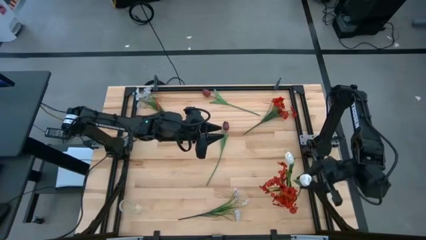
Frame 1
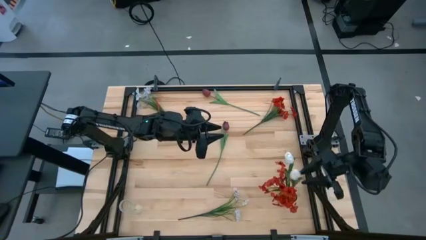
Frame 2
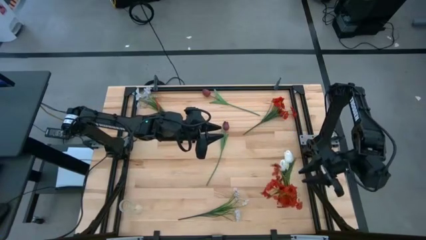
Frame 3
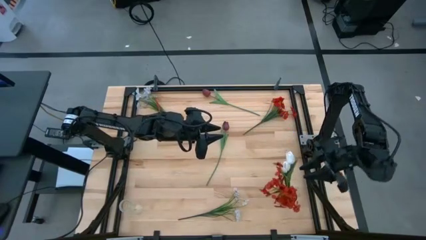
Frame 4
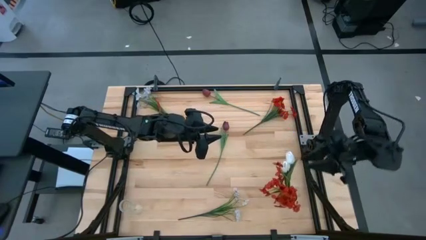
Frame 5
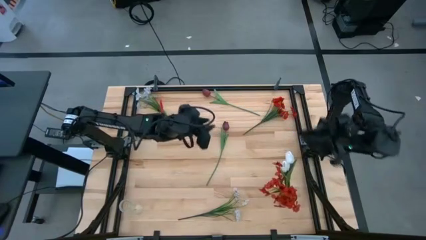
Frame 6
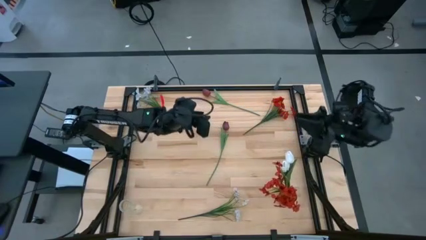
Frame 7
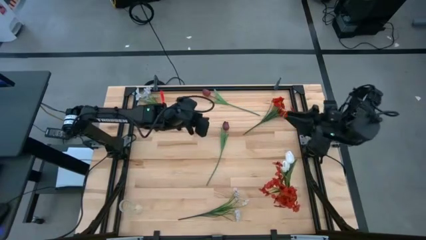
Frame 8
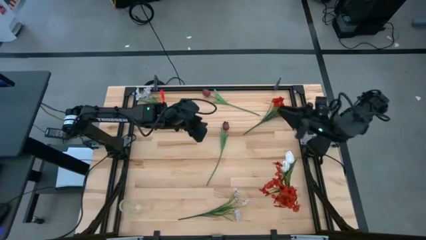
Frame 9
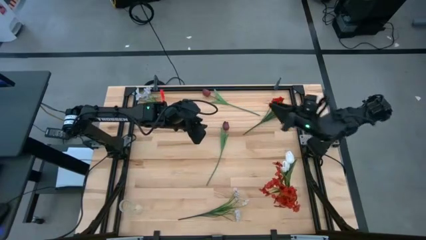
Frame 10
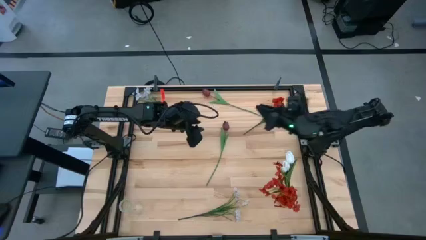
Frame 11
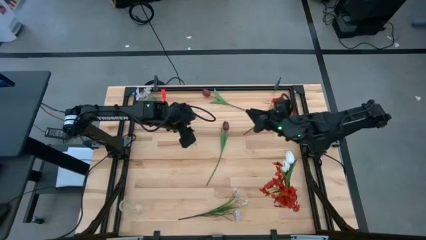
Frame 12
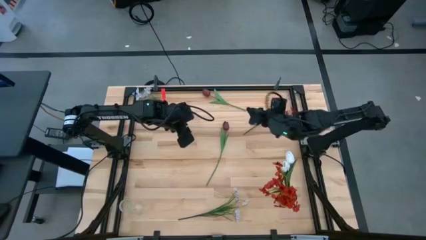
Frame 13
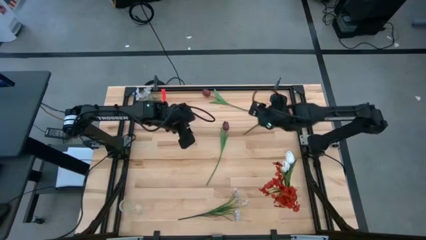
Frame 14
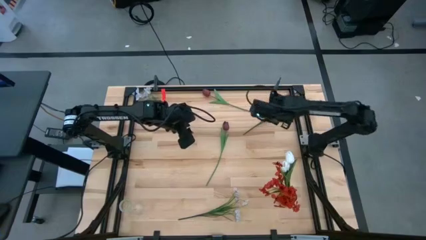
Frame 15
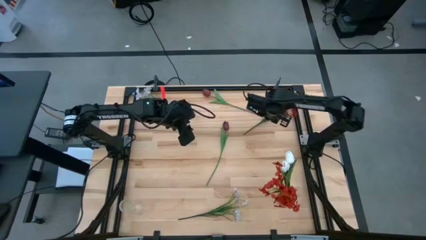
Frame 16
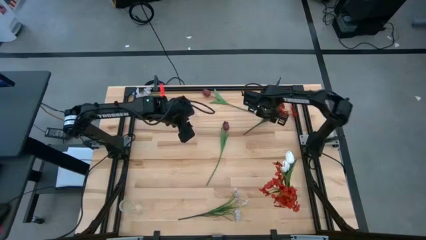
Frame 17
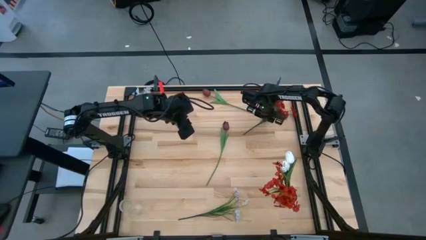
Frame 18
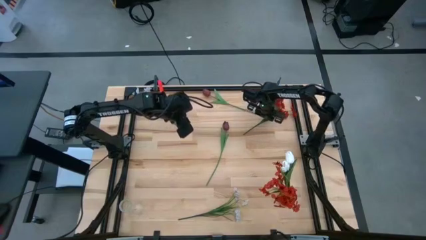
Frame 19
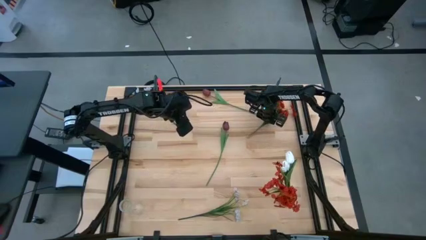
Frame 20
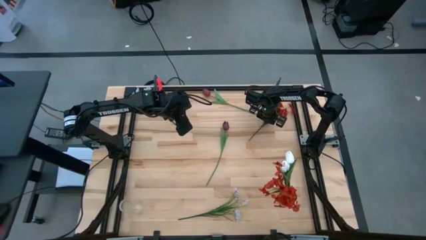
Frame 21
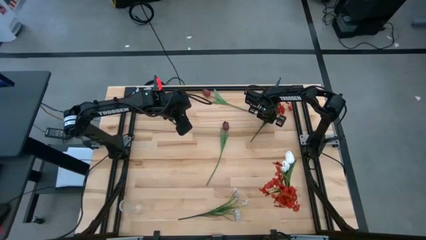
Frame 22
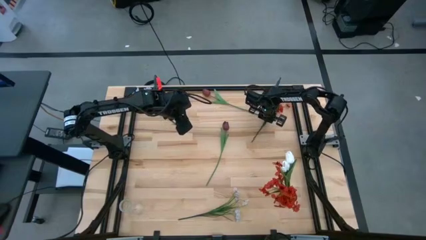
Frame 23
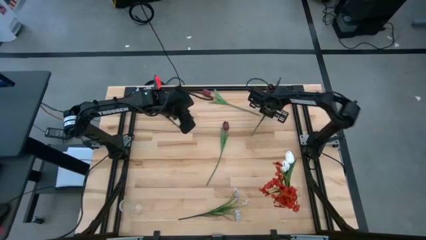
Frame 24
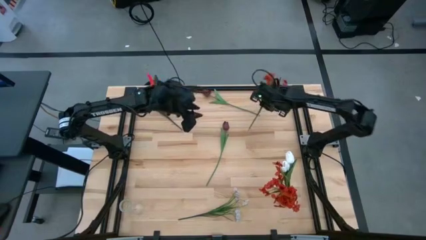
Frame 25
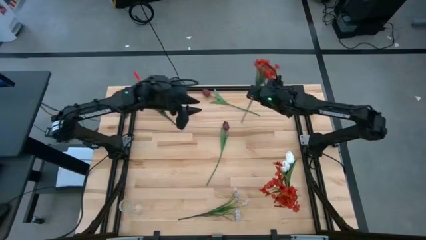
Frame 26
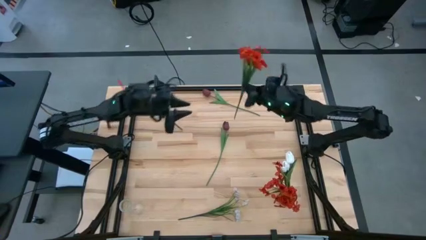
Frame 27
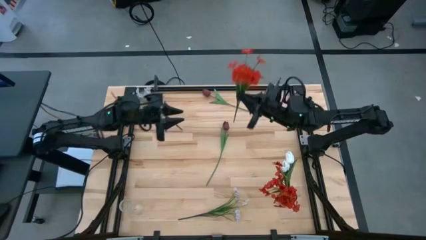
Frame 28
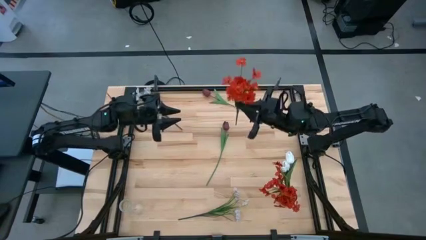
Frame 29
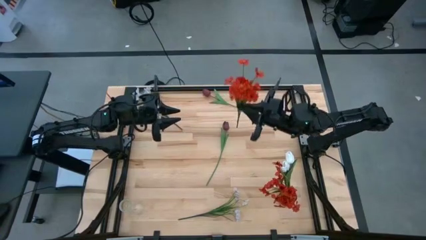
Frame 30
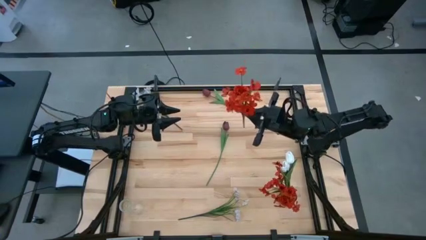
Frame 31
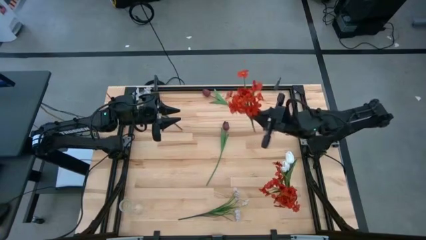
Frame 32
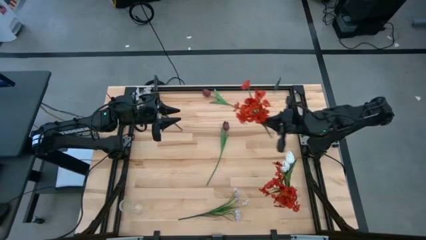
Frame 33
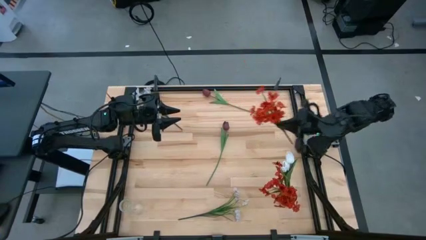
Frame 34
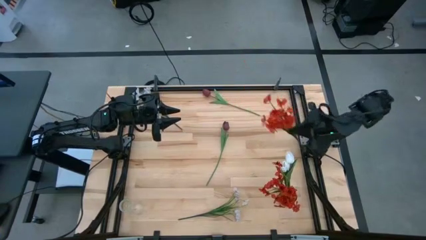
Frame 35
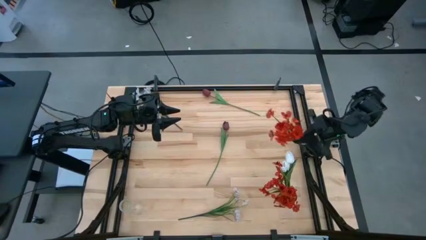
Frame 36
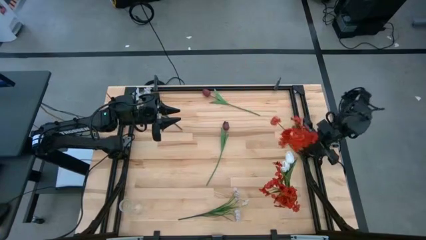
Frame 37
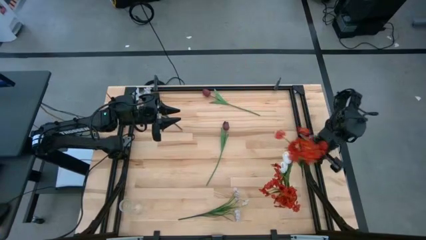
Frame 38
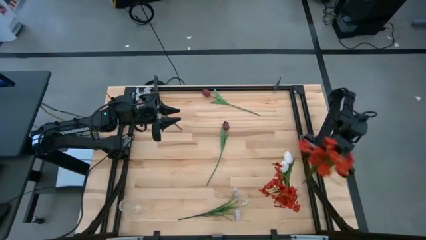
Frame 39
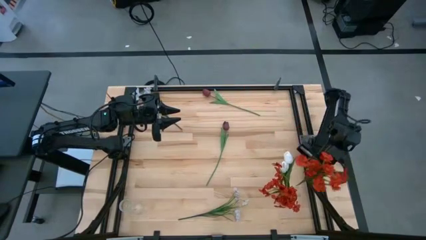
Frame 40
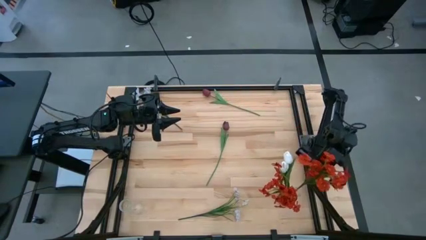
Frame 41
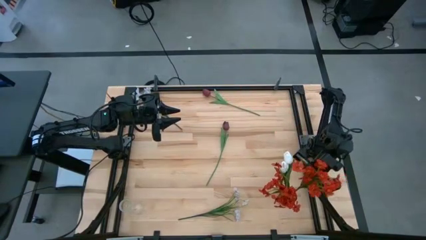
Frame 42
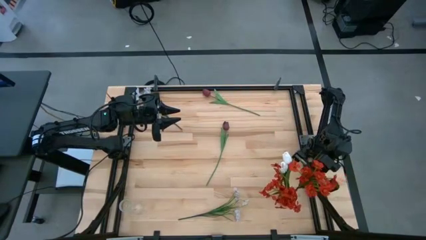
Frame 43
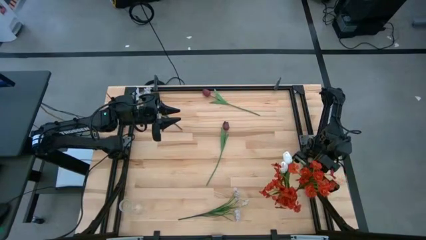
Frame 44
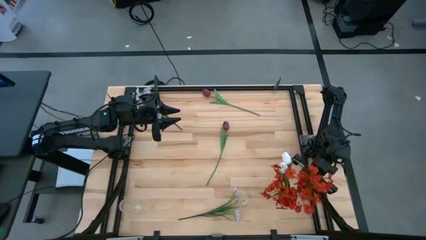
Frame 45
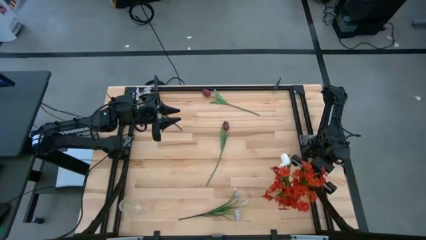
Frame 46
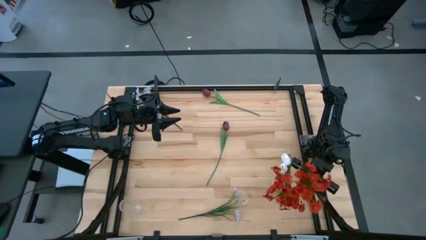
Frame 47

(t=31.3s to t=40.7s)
Task: Sort flowers into vase by color
Put the orange flowers into the red vase

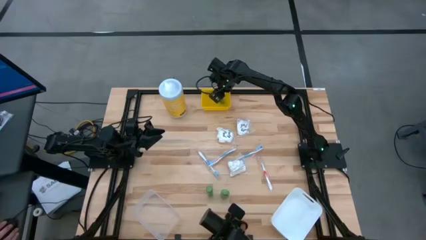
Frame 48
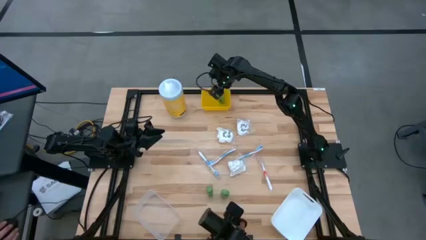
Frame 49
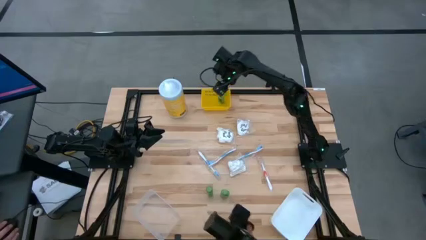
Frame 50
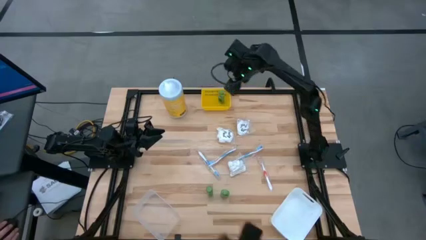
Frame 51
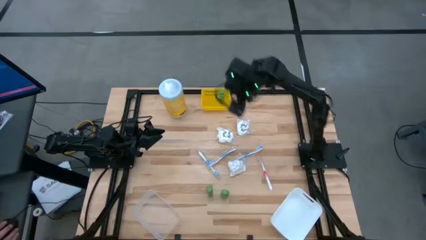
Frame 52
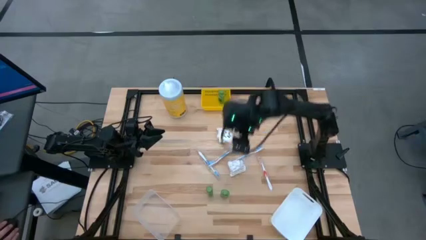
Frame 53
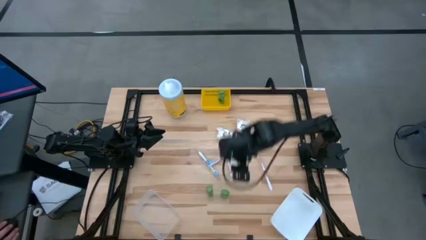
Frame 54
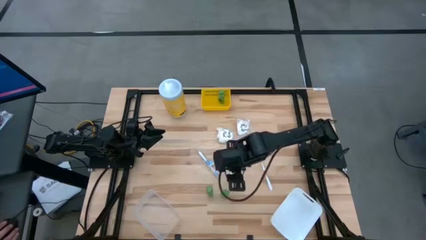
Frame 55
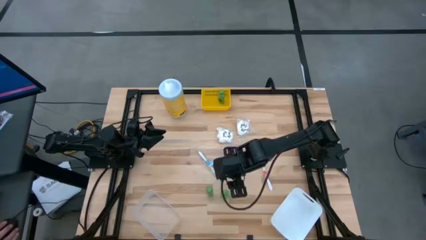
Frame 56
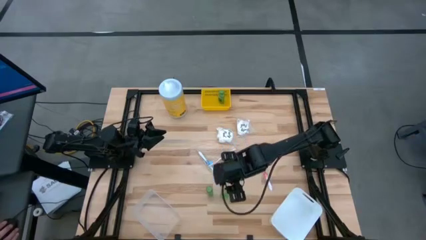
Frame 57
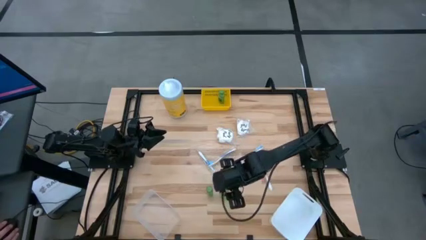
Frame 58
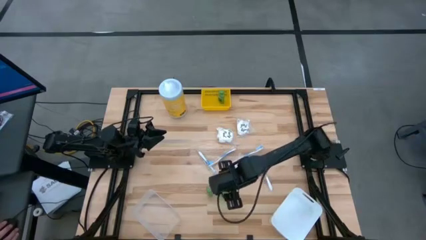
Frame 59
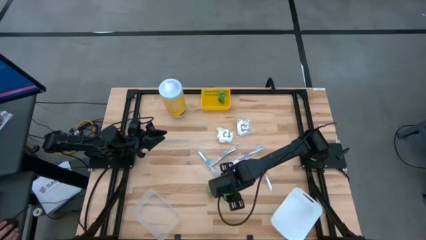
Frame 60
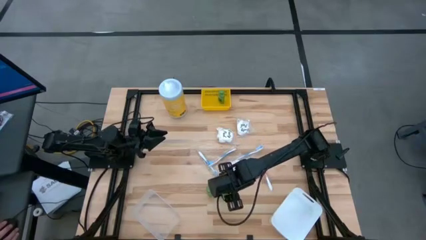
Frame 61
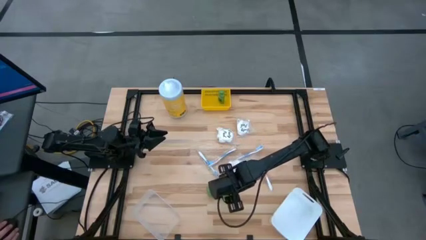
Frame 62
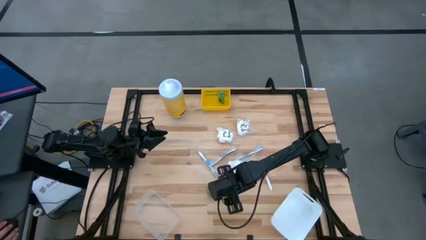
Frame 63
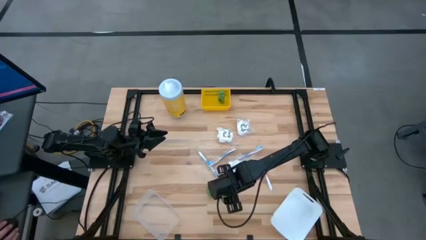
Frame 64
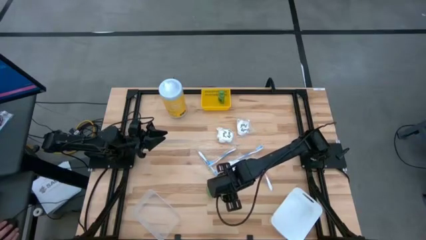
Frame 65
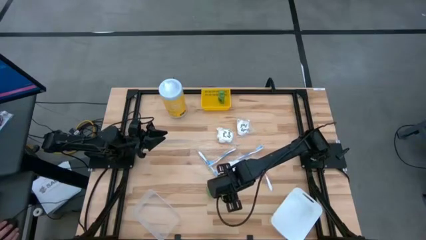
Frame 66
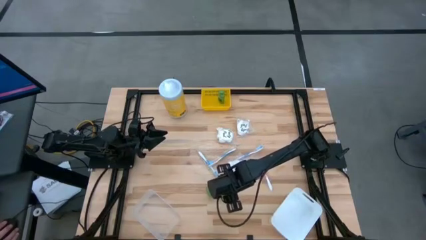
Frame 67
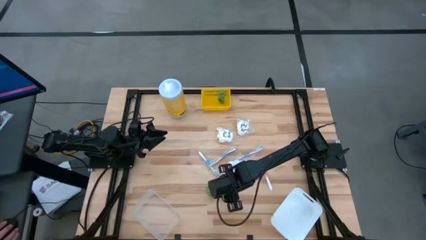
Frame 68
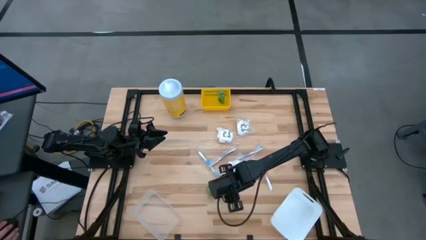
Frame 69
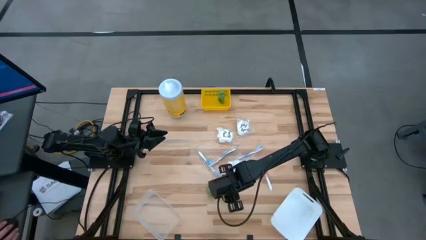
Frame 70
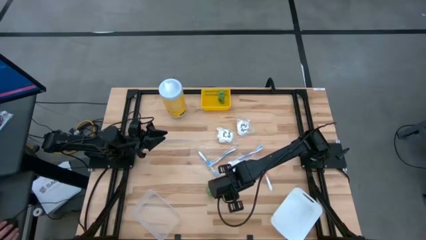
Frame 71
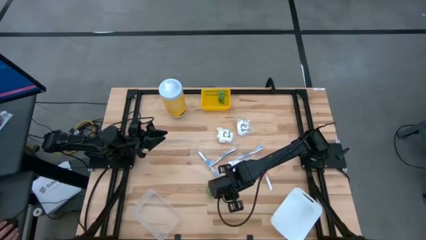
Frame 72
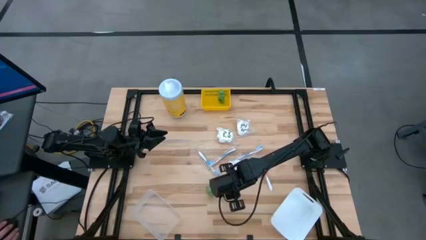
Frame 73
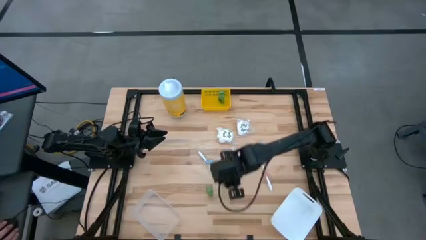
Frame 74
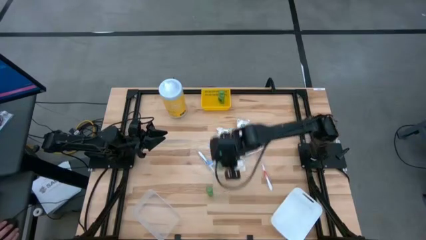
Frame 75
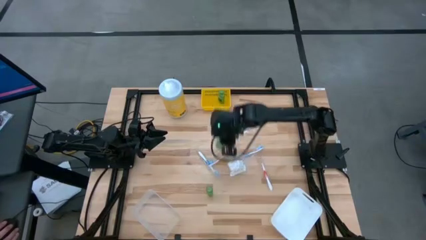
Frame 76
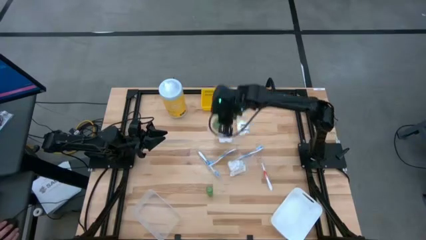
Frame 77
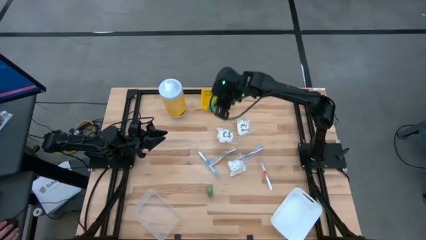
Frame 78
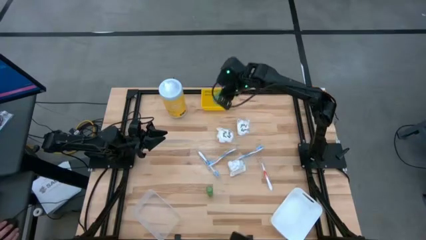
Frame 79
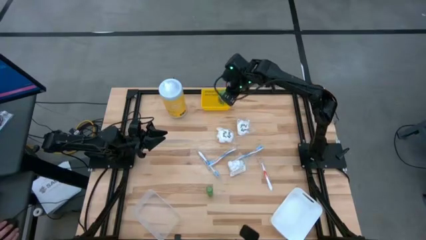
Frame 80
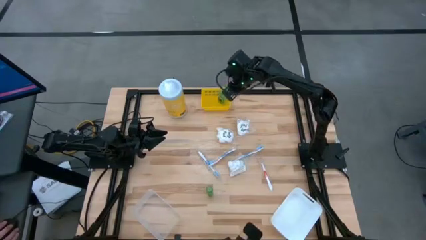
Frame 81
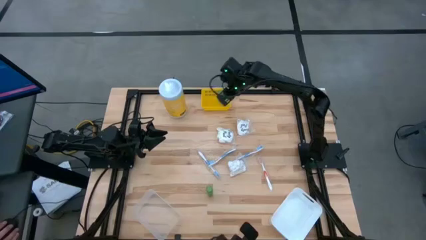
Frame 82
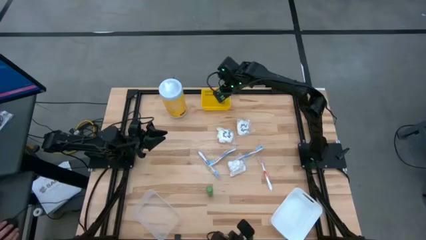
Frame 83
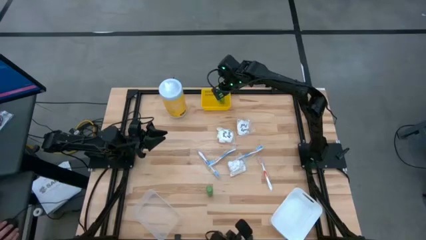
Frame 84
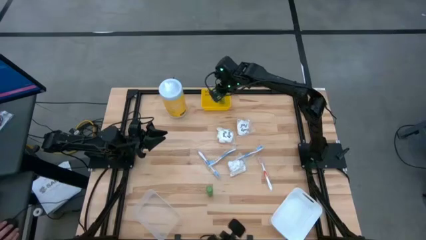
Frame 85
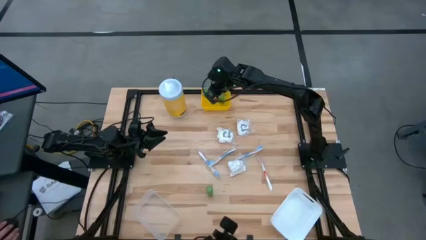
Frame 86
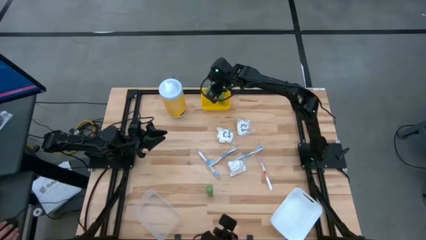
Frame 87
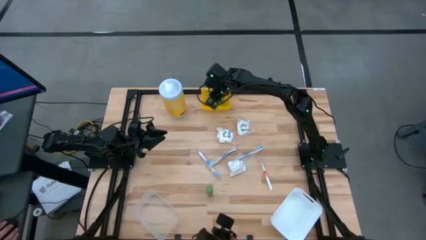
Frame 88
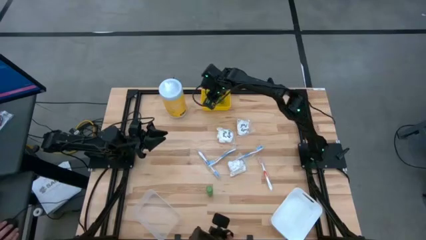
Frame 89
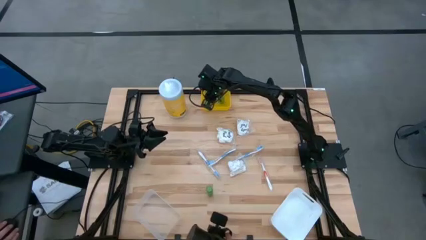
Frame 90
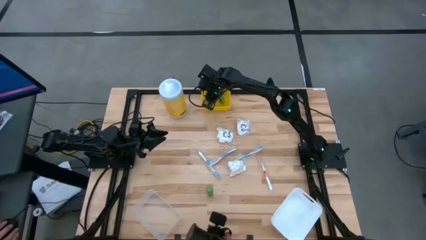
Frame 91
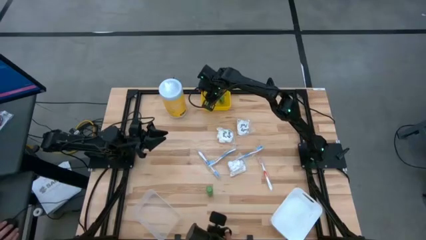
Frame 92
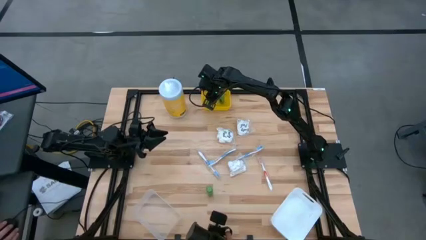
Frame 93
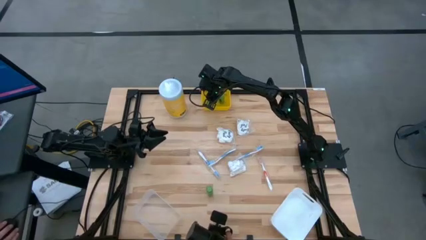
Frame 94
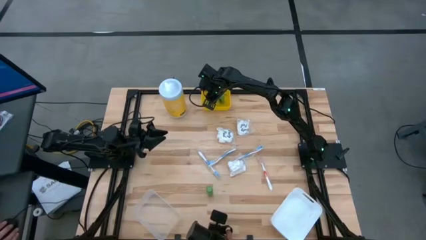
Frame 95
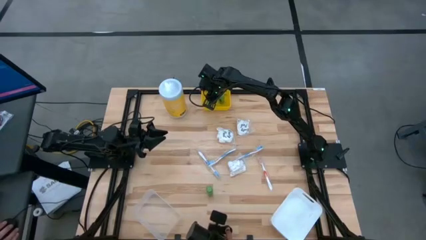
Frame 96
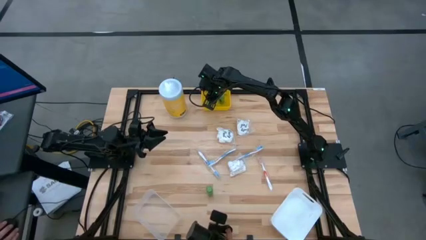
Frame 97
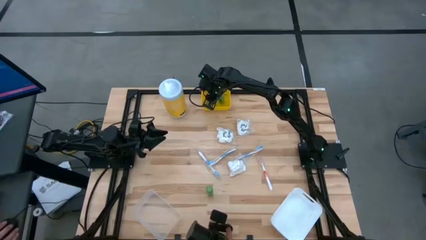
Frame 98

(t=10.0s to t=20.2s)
Task: Pick & Place Travel size toiletries
Put the right green shampoo into the yellow bin
